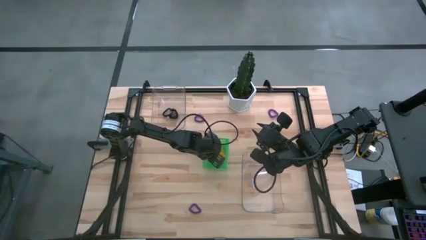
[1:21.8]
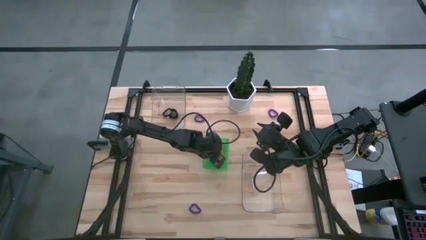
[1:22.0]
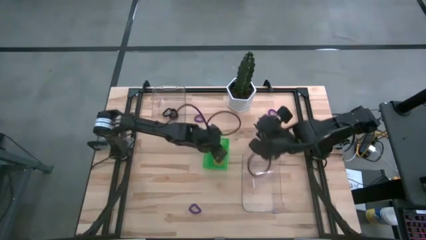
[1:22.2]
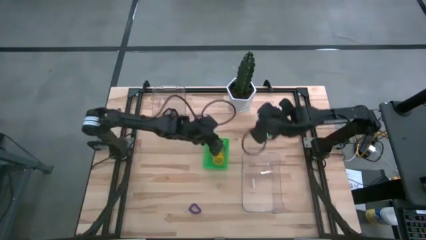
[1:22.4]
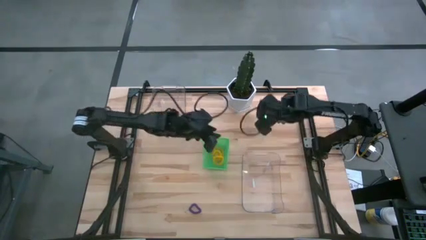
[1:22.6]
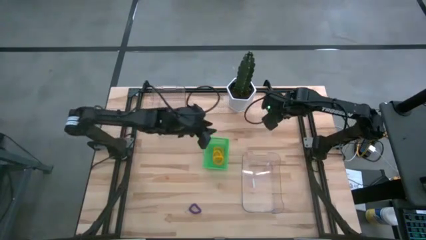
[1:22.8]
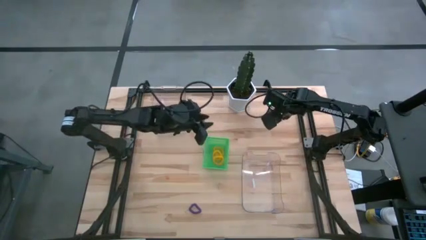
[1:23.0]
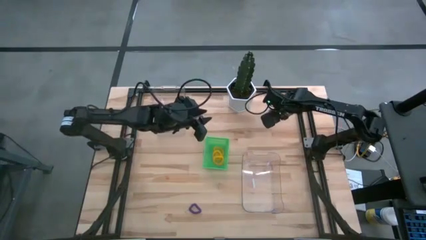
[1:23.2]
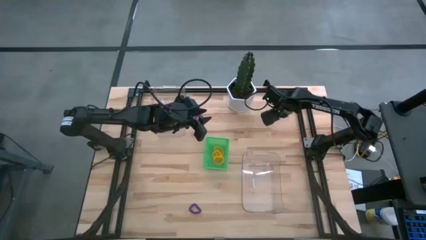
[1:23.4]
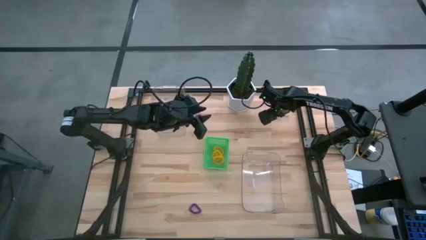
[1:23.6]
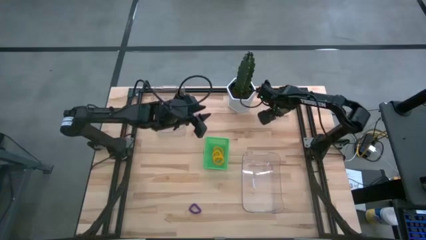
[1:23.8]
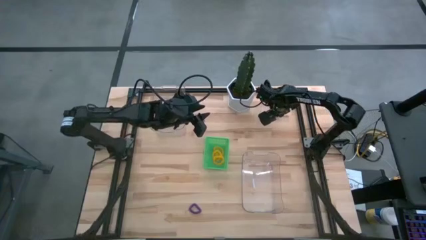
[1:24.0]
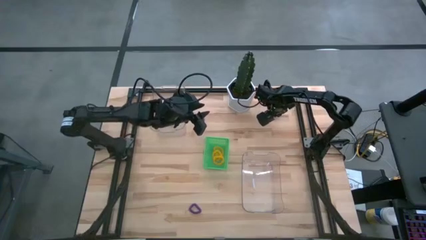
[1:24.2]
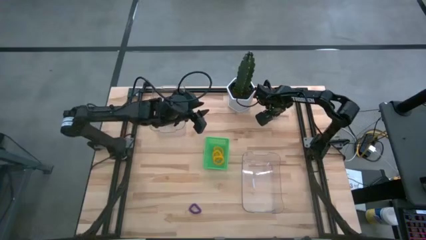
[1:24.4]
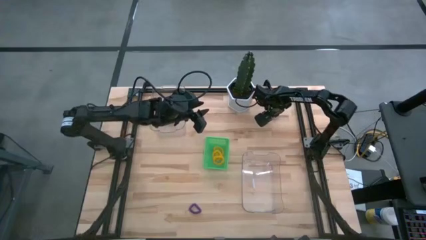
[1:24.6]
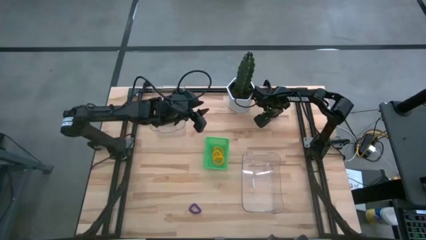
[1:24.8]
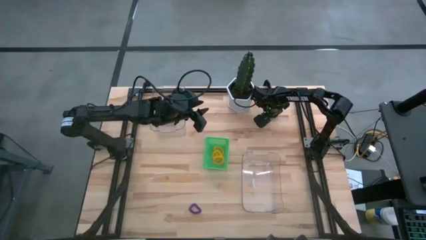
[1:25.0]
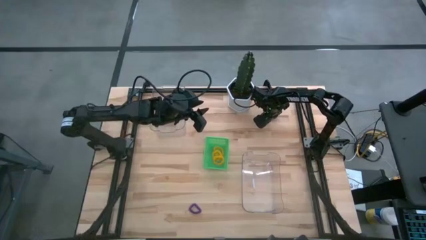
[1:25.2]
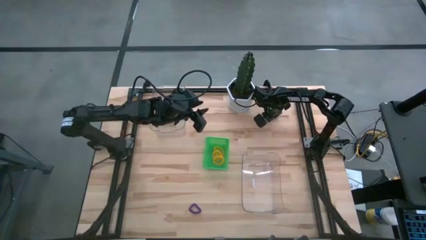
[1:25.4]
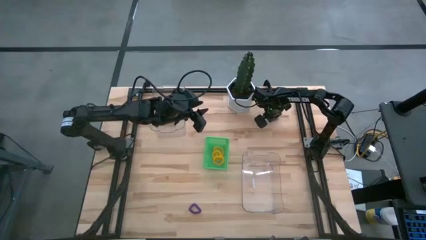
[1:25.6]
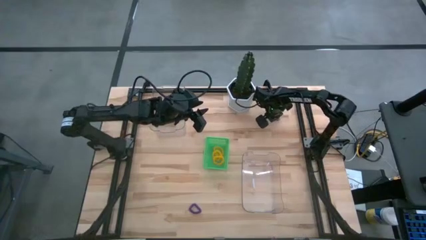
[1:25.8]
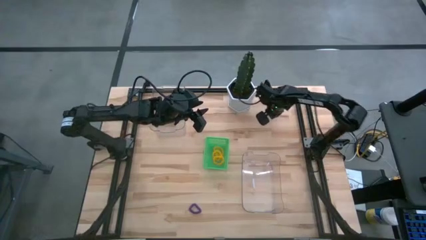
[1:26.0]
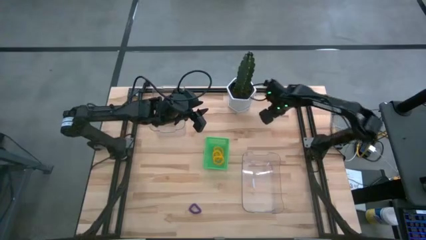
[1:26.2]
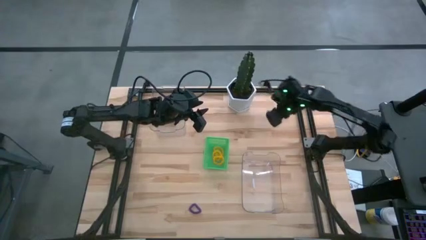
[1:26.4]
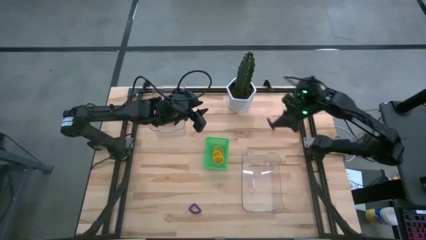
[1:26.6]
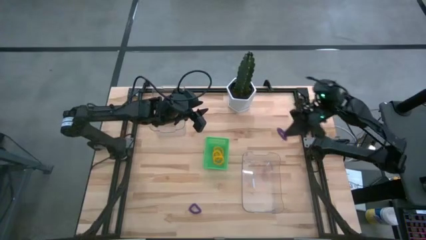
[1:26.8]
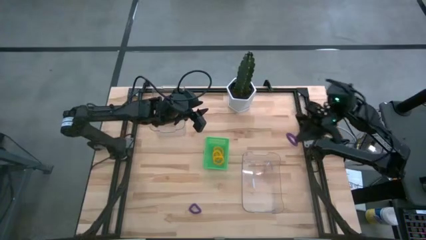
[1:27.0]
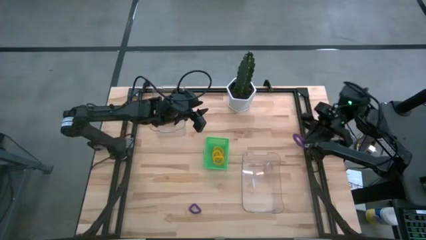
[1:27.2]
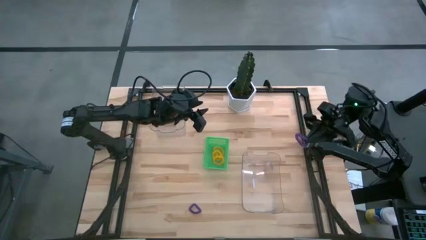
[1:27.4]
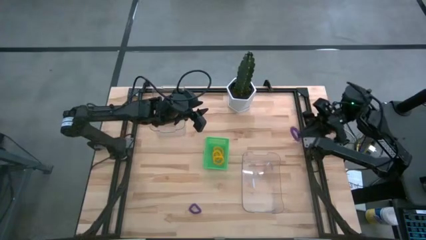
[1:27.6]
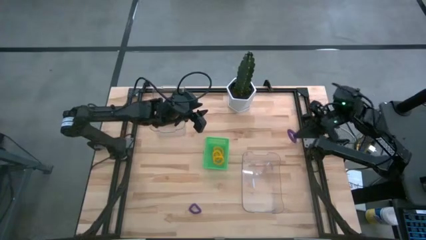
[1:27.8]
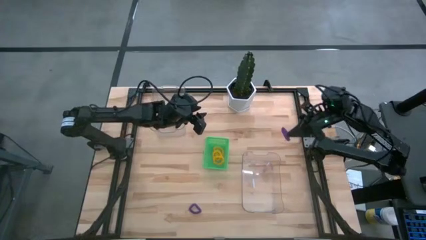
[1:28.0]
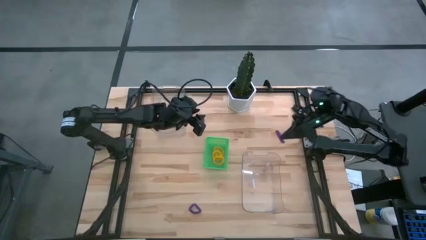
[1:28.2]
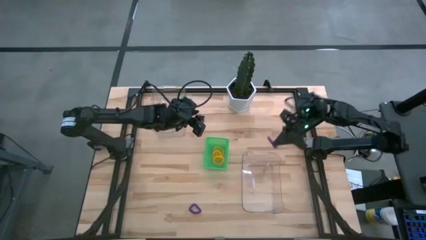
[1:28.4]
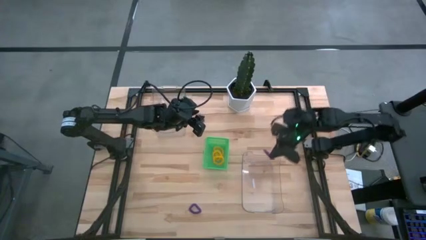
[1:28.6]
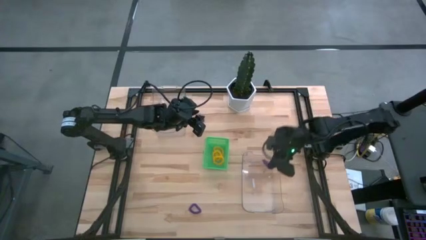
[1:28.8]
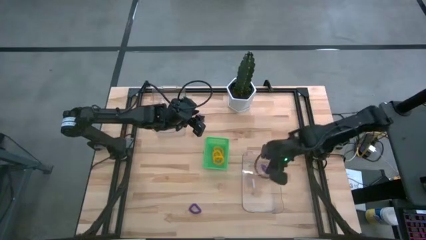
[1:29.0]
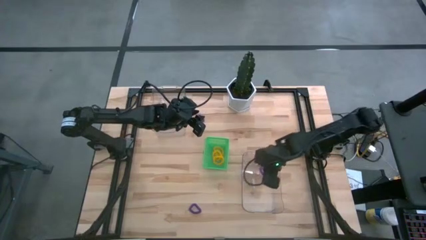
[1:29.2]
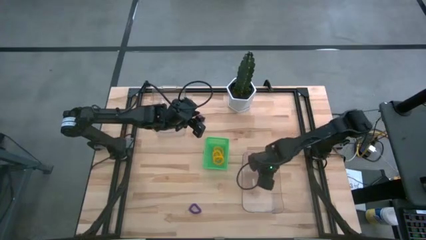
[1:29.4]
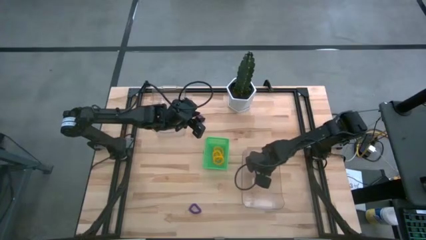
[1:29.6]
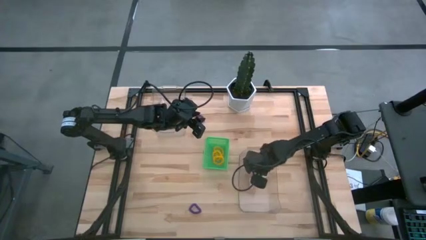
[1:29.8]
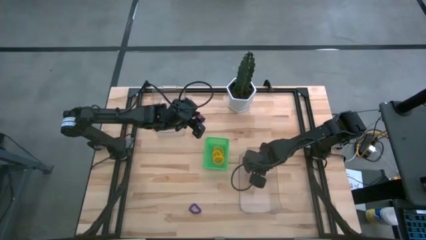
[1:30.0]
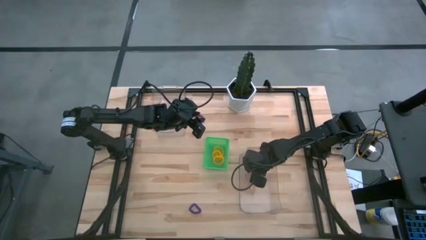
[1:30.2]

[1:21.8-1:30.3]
Task: Sort spring keychains
Put the right purple spring keychain into the bottom transparent bin

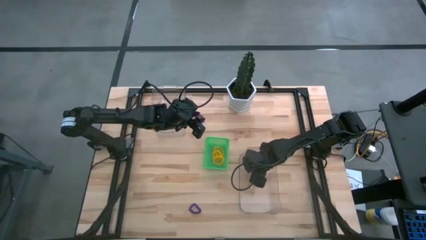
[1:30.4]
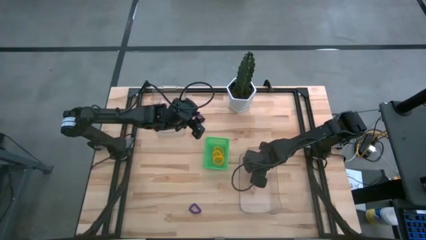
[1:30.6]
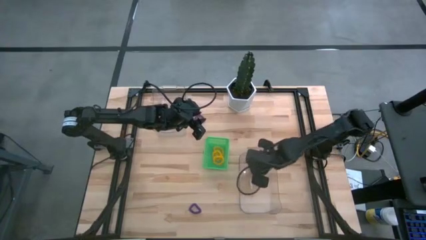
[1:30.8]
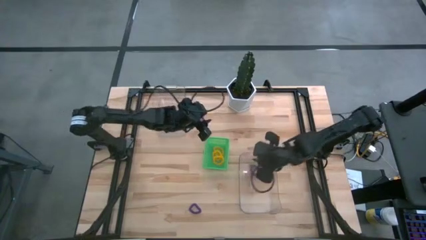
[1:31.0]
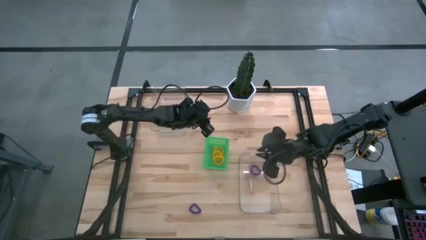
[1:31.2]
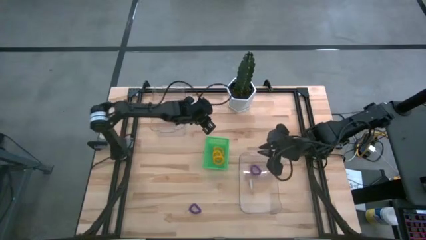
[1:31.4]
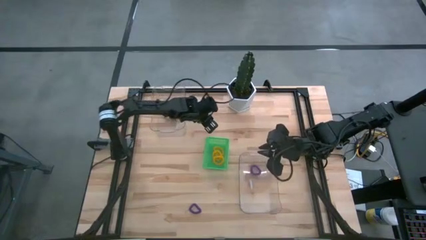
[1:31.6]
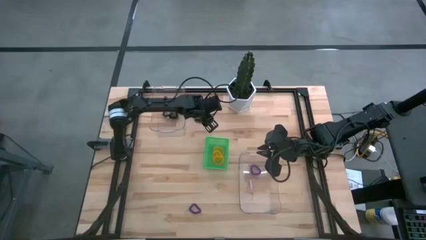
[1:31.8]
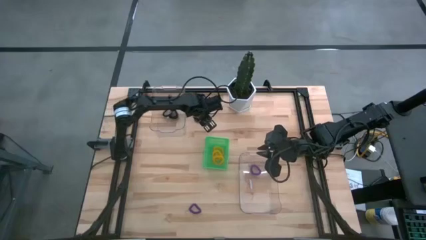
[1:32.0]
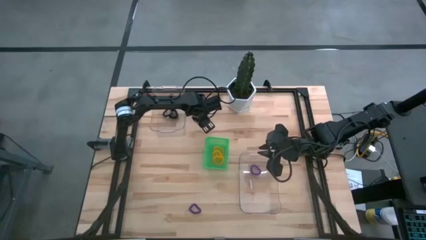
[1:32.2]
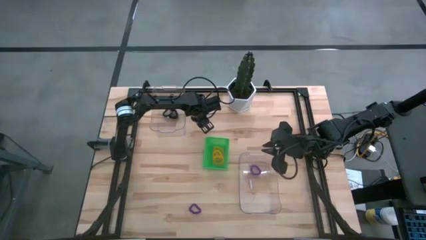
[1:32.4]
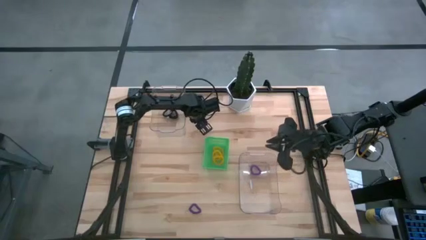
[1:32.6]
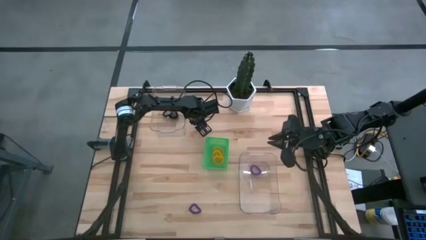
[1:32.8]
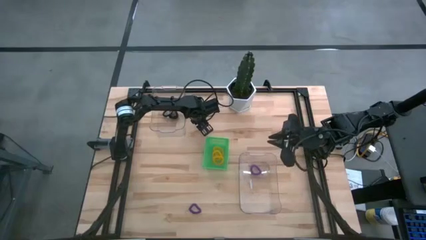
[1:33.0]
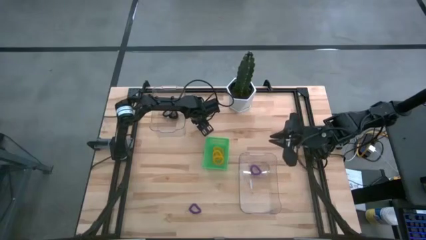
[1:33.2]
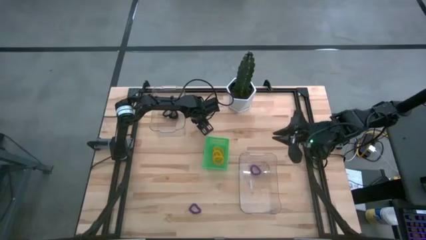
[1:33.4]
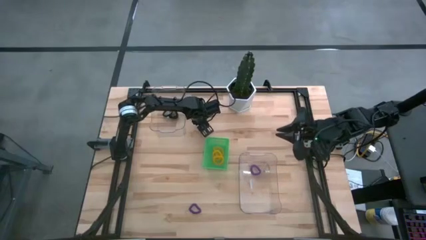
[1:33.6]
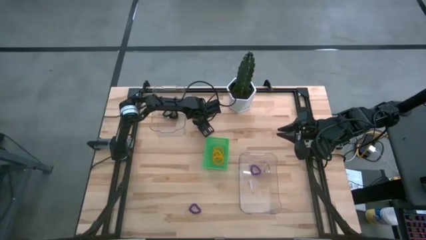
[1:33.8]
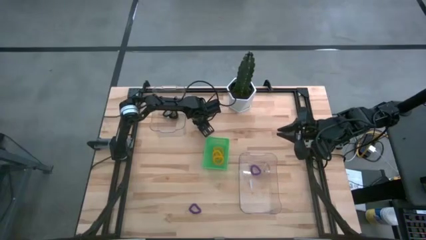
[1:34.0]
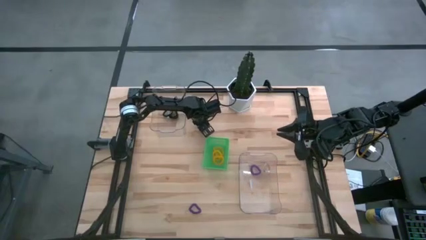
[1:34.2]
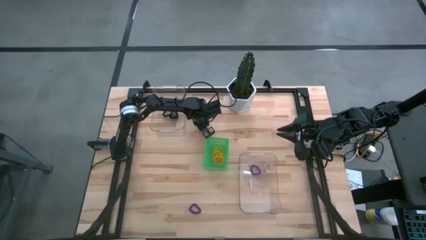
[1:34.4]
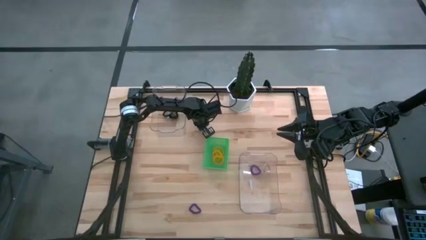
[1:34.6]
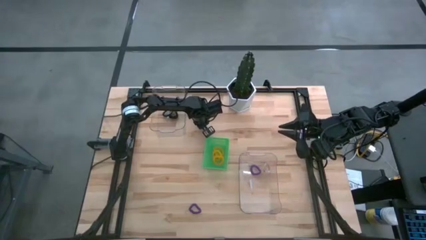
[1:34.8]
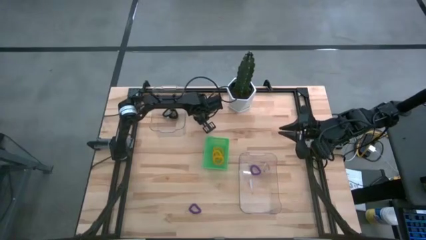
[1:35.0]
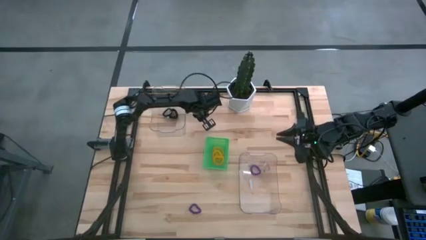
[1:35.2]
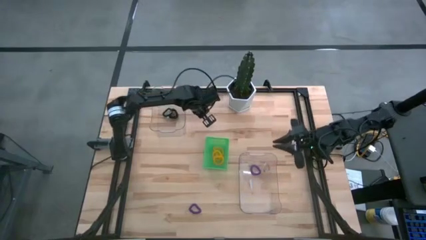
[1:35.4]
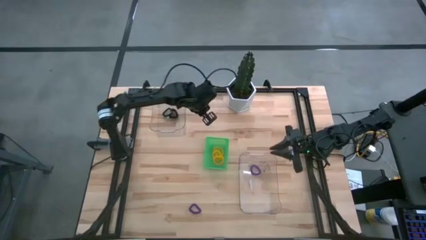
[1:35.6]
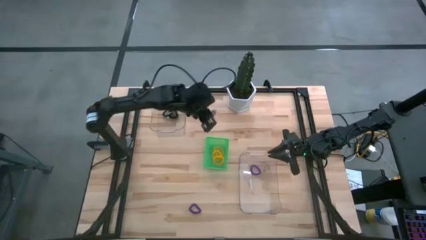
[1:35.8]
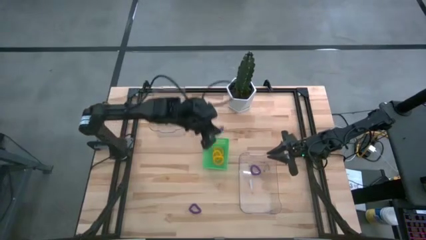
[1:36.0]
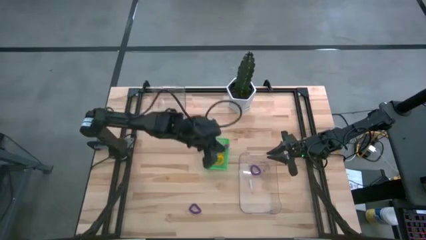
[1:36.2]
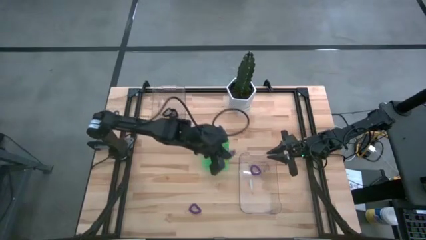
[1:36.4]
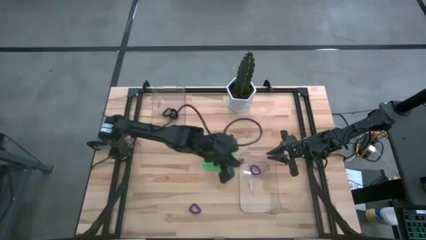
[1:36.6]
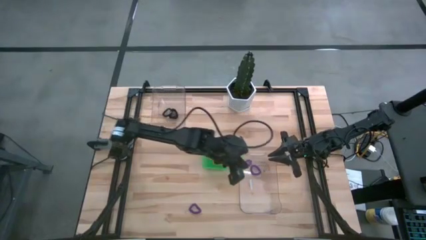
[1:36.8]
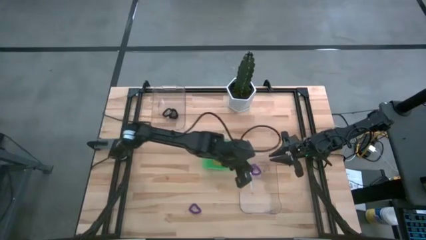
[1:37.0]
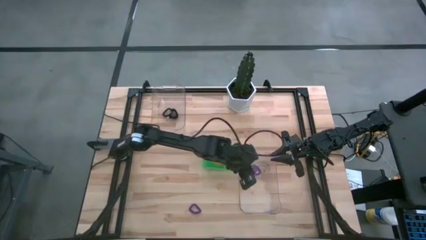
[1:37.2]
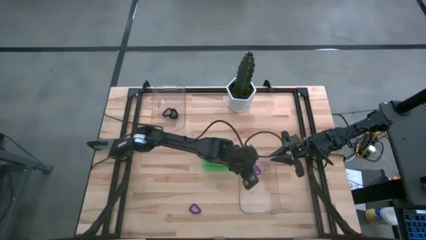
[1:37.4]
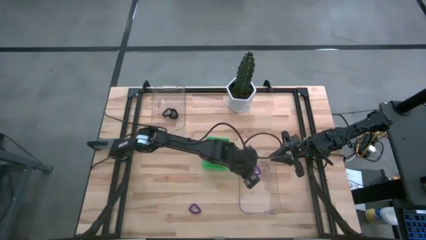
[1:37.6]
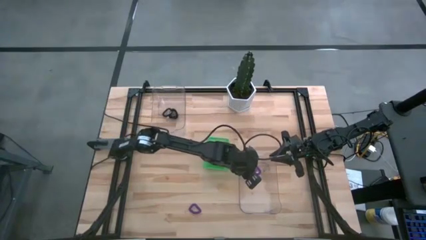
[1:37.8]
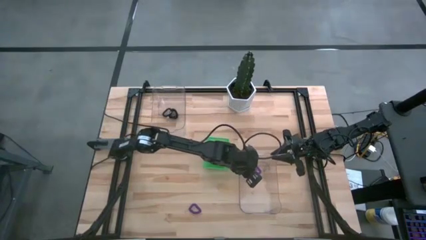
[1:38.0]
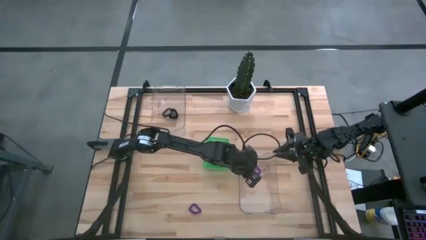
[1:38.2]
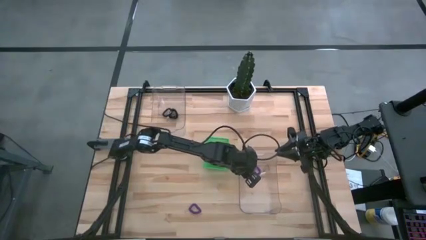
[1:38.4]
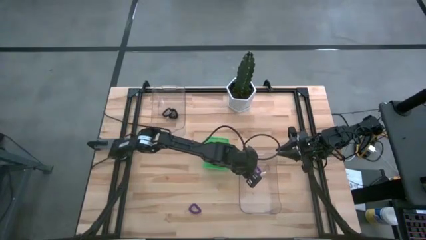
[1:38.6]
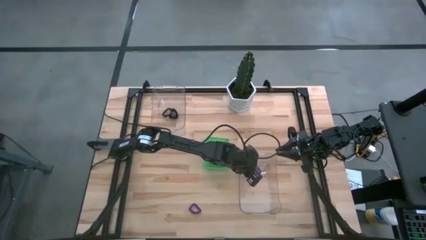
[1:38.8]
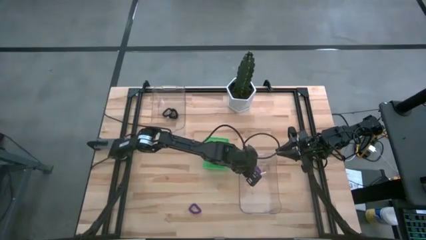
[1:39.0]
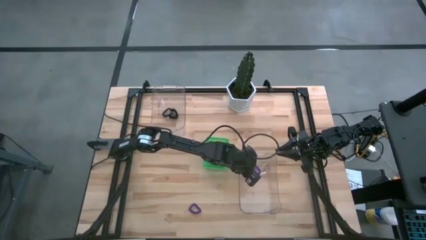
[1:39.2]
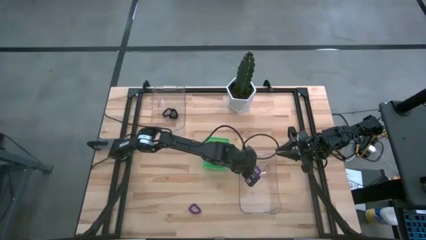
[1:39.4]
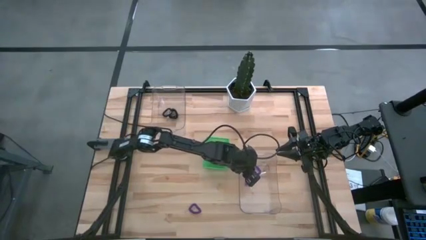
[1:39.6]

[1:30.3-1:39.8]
Put the top purple spring keychain into the bottom transparent bin
